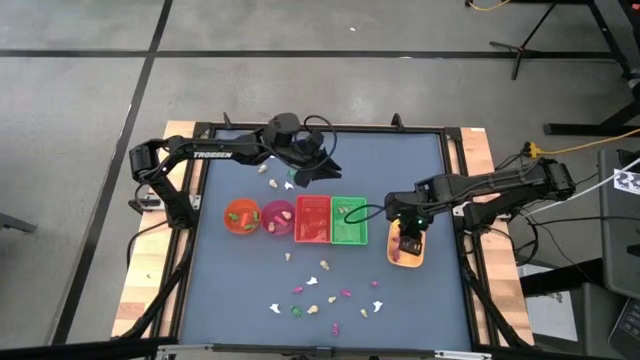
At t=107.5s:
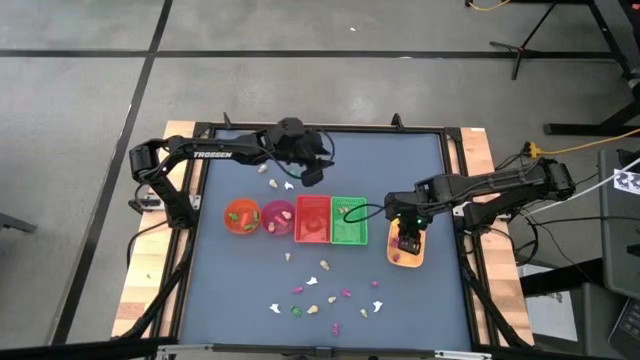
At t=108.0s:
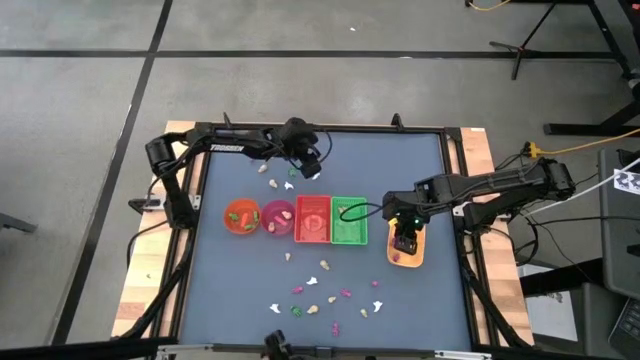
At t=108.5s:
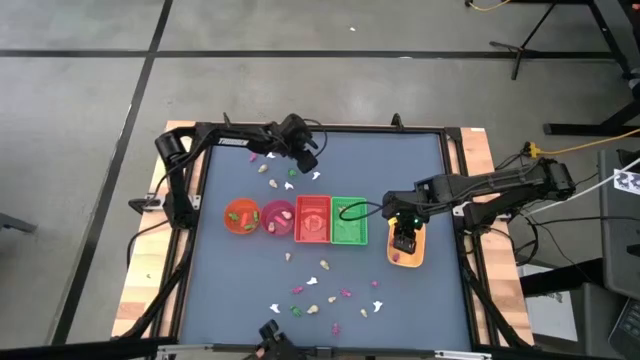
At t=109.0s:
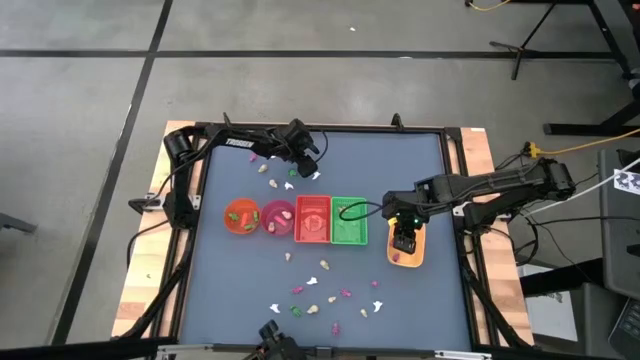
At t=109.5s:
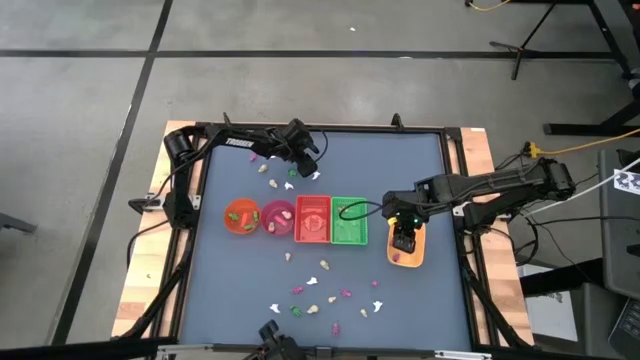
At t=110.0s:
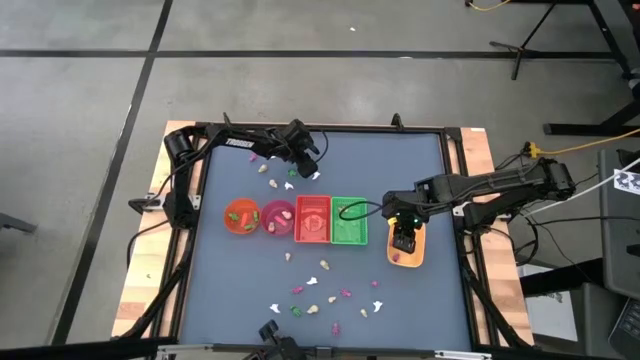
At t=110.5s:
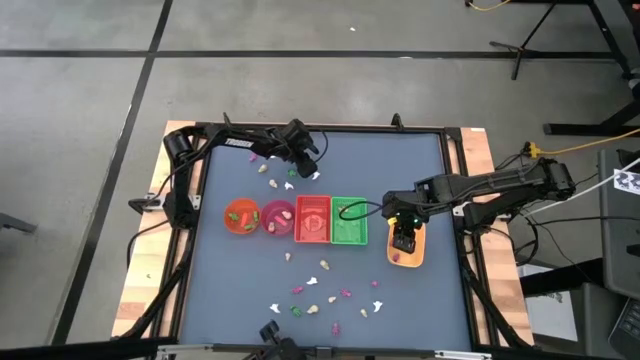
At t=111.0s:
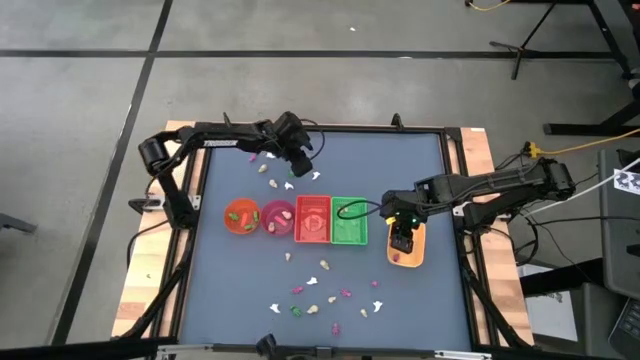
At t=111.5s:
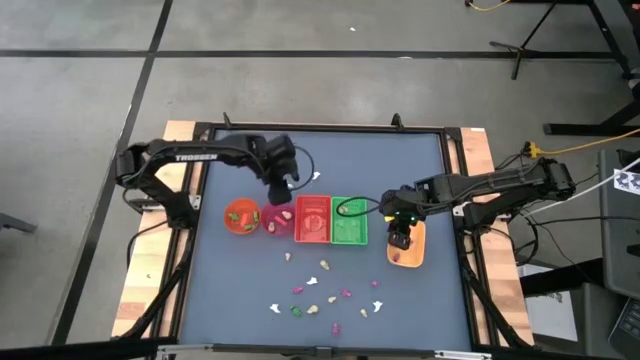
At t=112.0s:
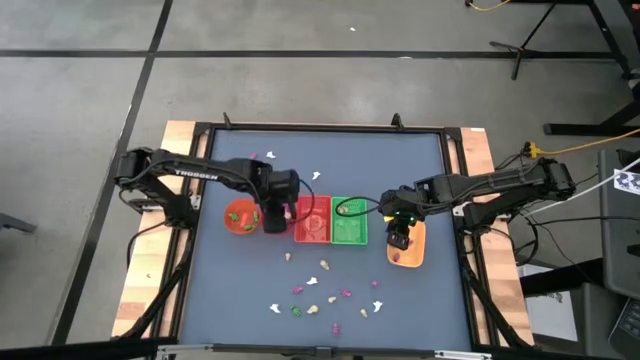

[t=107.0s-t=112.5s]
Task: Sort Halloween decoration
Put the yellow skull toy into the pink bowl

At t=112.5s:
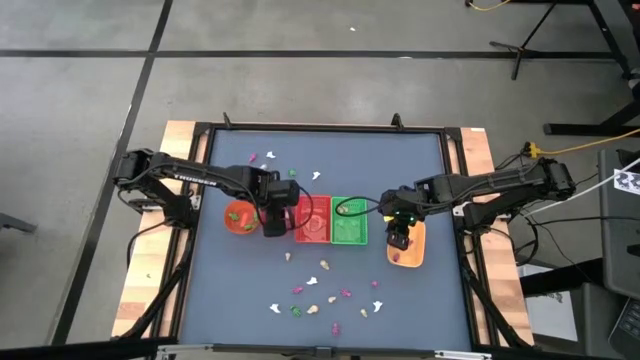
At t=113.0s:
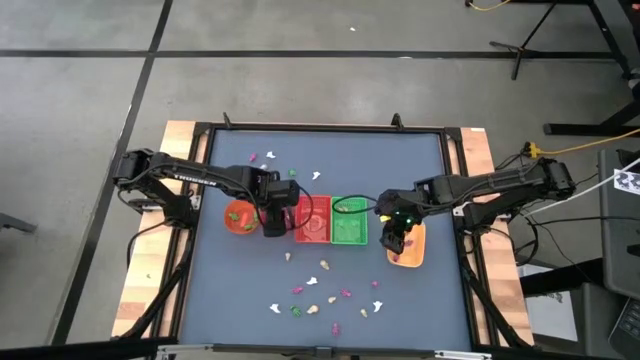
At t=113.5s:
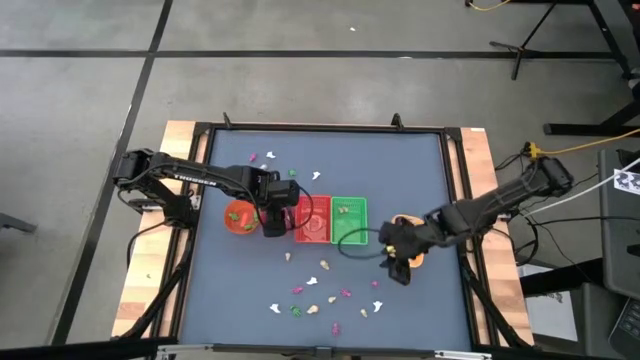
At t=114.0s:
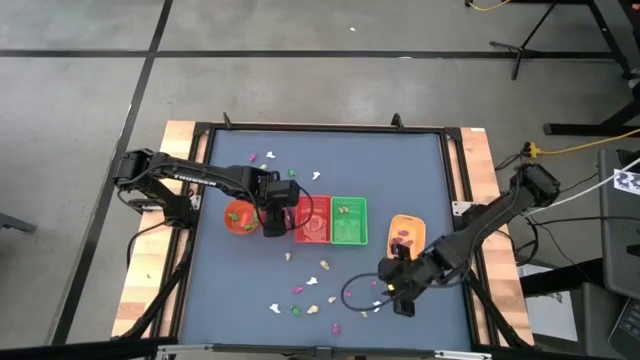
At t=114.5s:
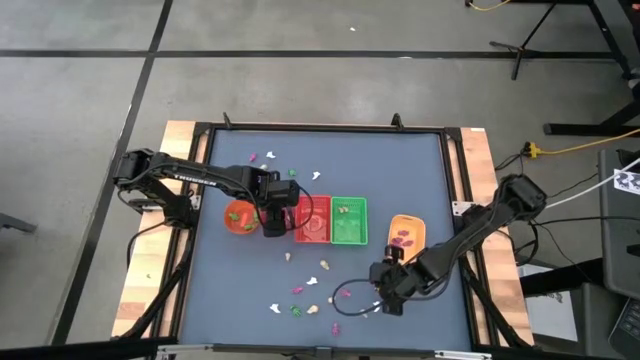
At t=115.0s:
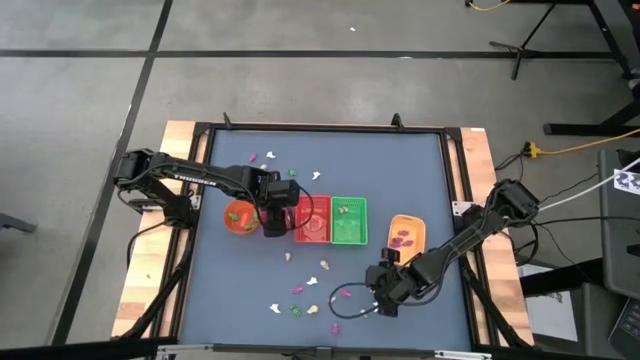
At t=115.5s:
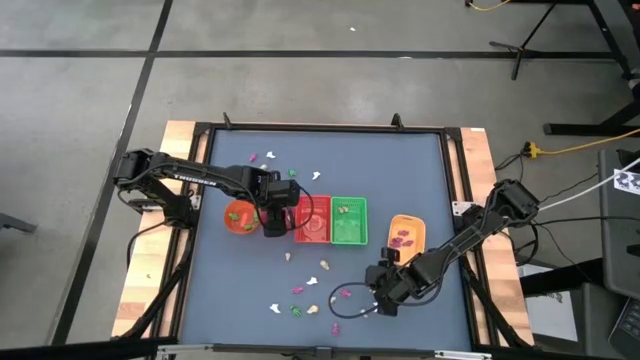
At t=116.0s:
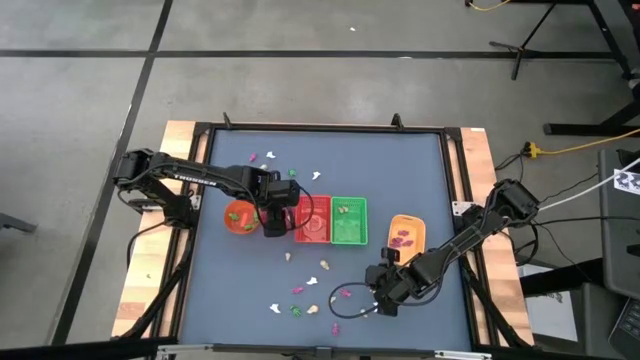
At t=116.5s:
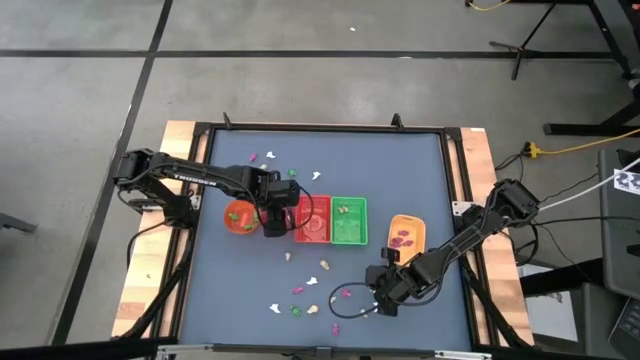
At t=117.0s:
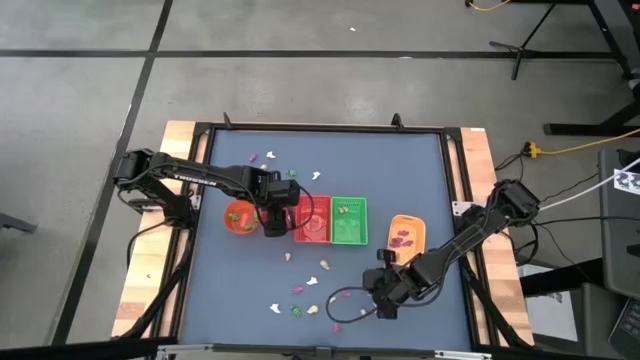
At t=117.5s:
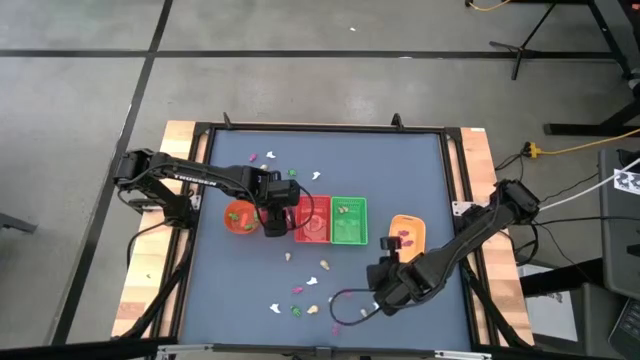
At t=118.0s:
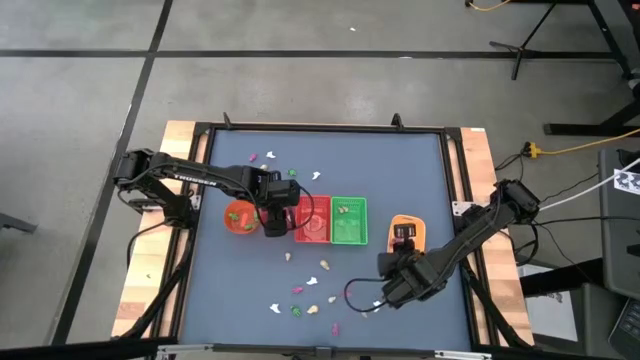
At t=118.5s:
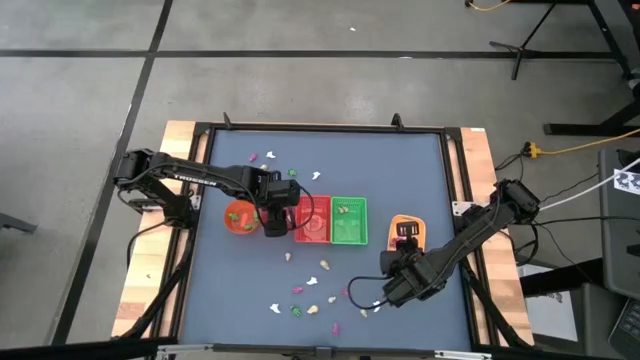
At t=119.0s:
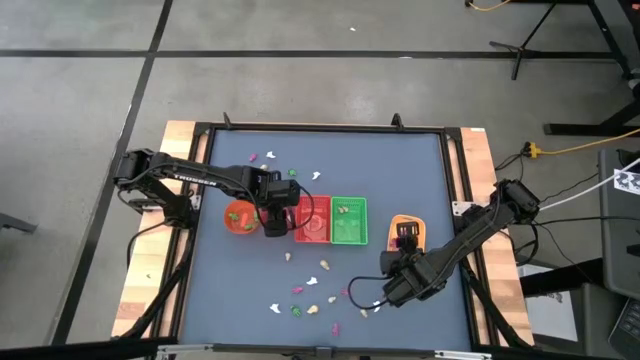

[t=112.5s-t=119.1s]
Put the pink skeleton toy into the yellow bin

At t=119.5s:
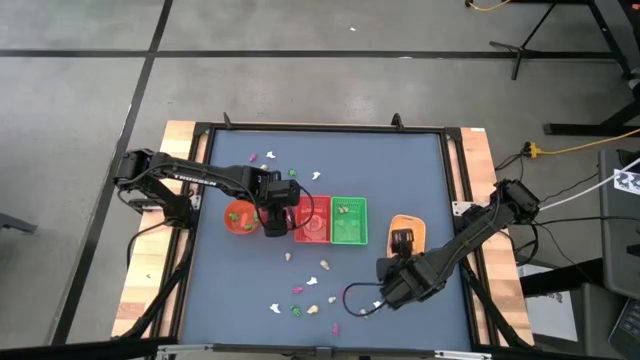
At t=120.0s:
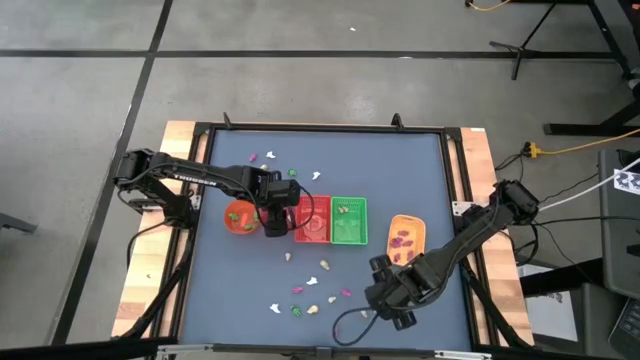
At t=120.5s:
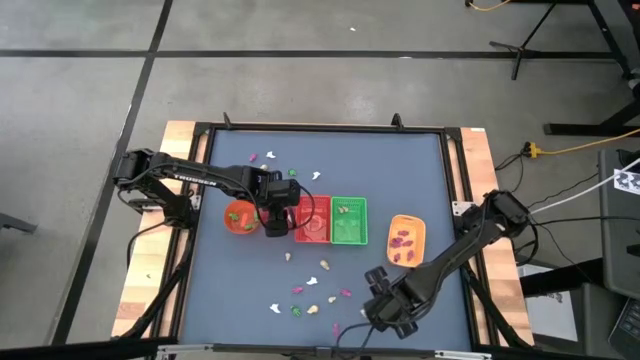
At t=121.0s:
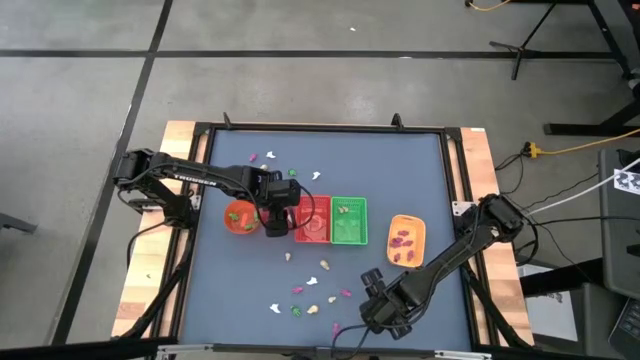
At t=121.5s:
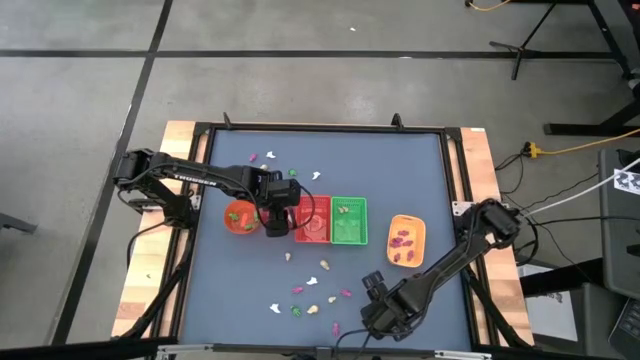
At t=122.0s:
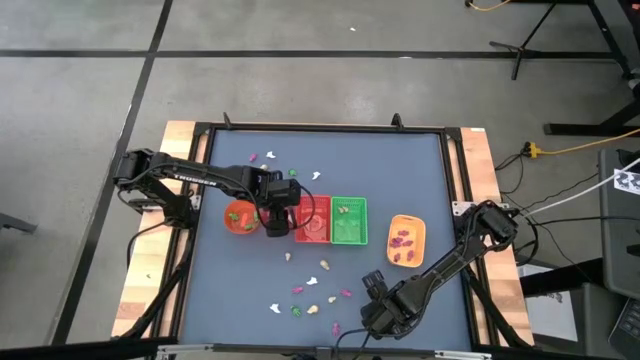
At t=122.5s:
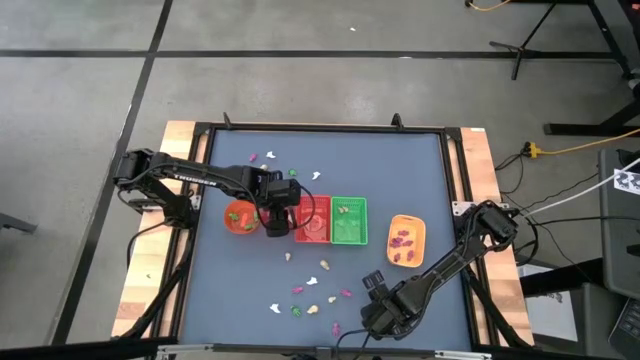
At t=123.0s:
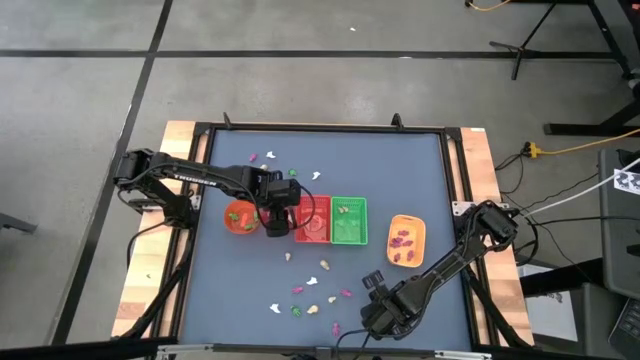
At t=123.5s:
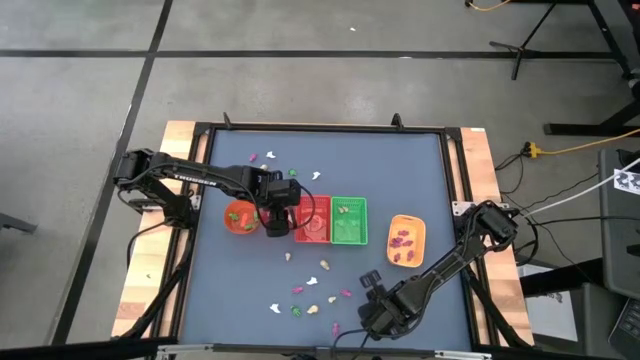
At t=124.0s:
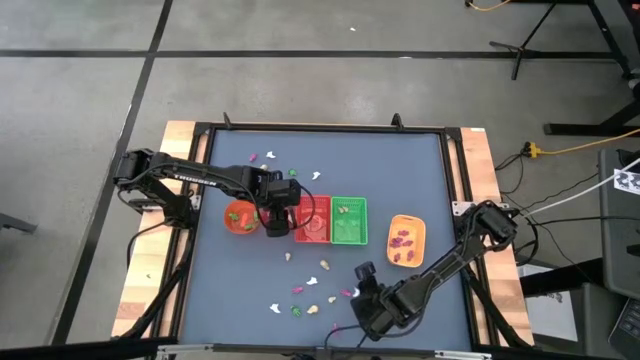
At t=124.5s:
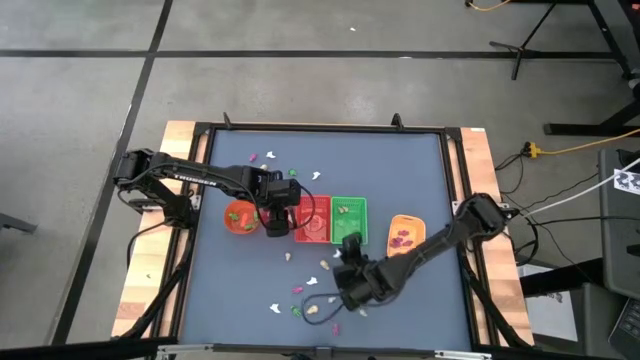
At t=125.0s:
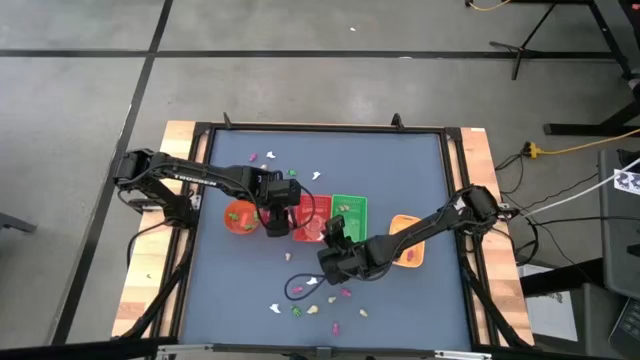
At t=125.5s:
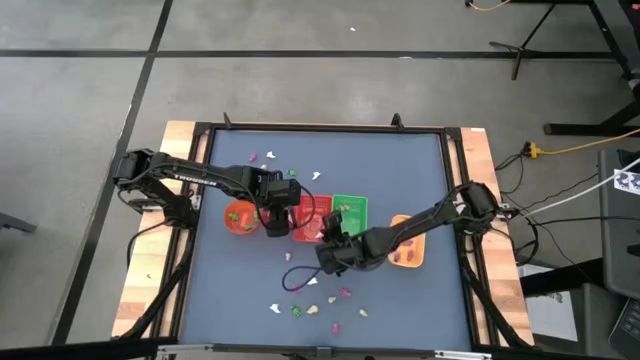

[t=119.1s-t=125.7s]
Put the white ghost toy into the red bin
